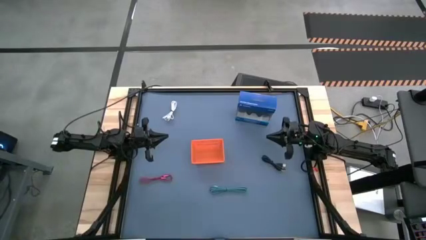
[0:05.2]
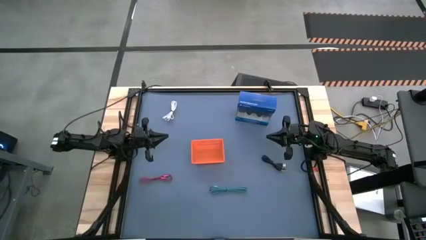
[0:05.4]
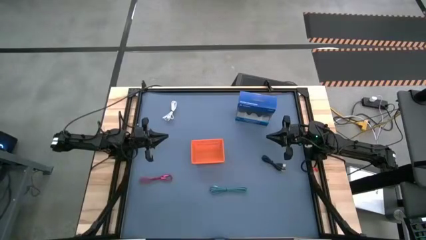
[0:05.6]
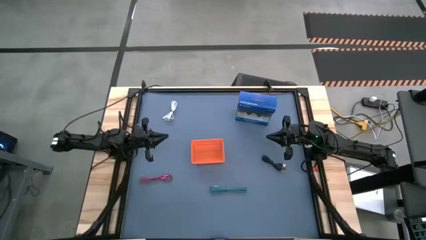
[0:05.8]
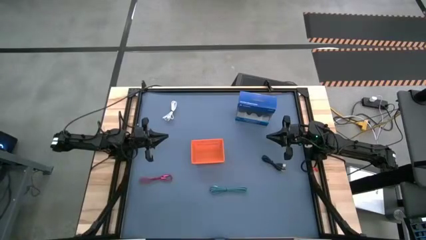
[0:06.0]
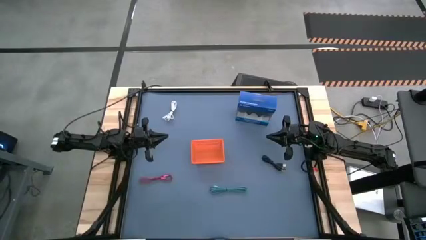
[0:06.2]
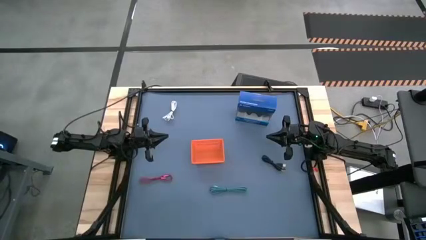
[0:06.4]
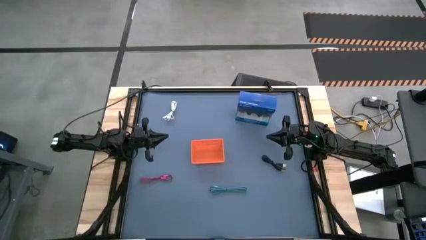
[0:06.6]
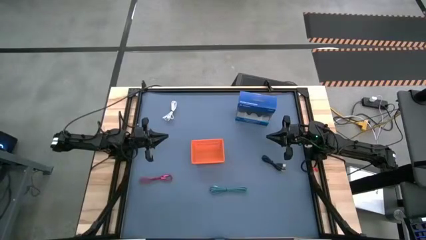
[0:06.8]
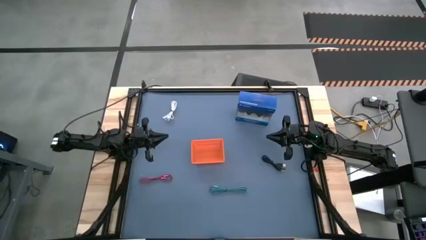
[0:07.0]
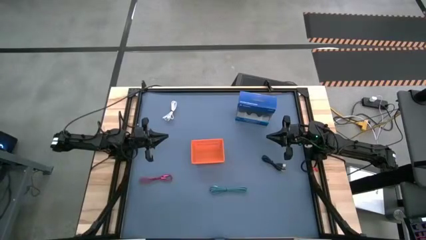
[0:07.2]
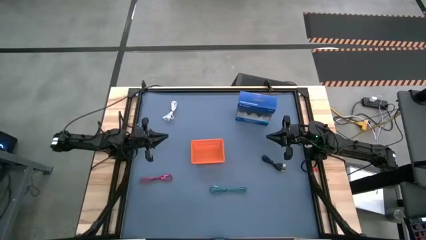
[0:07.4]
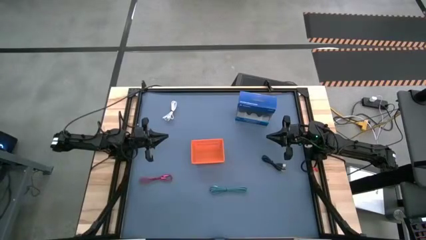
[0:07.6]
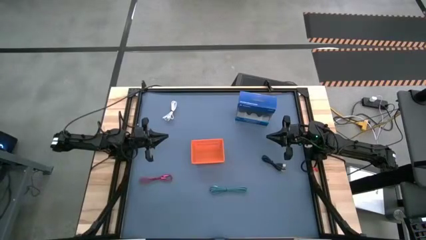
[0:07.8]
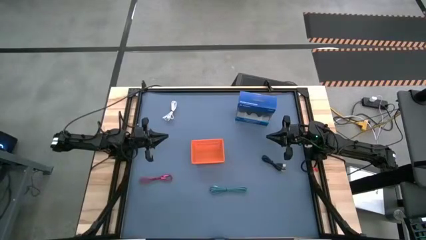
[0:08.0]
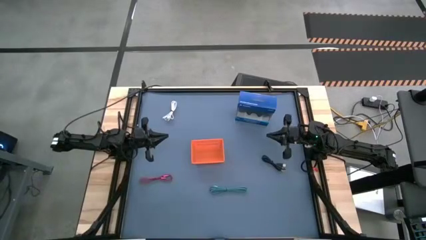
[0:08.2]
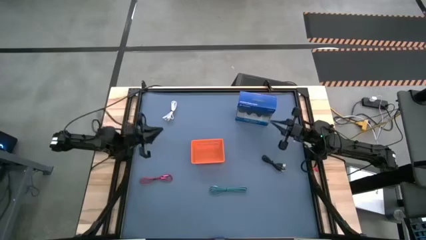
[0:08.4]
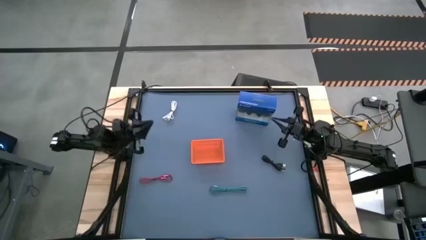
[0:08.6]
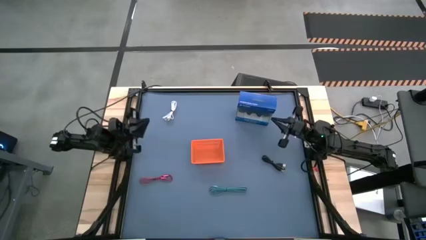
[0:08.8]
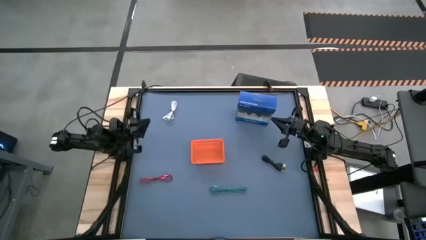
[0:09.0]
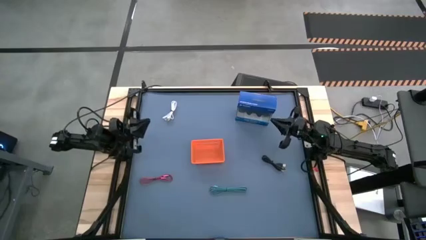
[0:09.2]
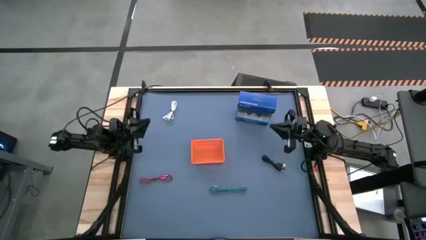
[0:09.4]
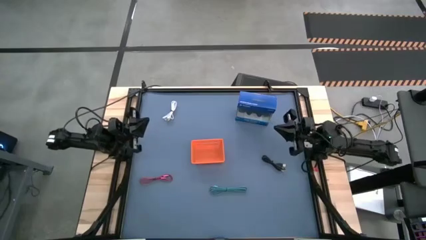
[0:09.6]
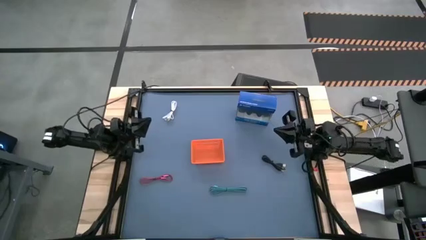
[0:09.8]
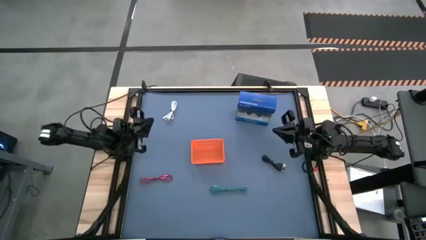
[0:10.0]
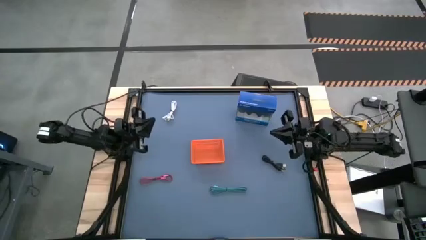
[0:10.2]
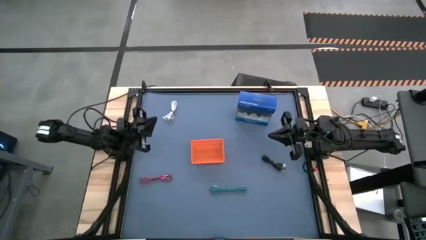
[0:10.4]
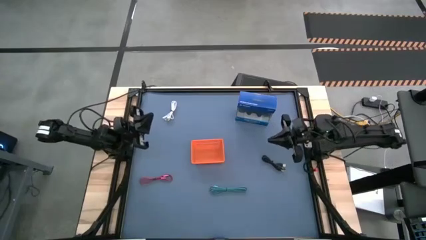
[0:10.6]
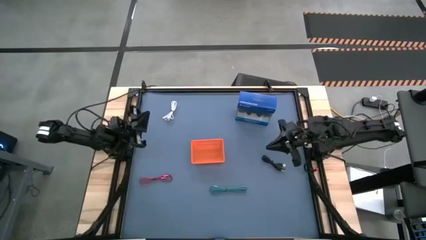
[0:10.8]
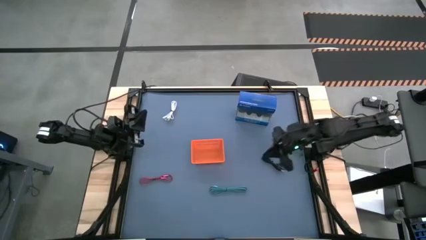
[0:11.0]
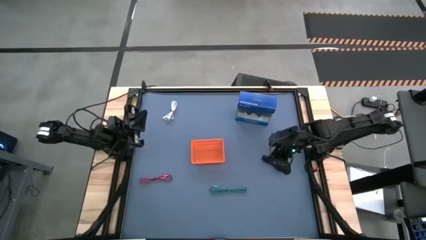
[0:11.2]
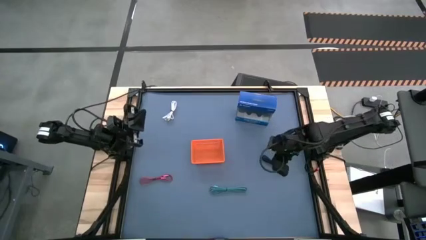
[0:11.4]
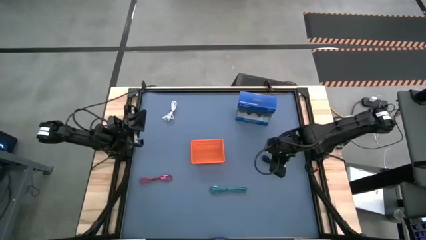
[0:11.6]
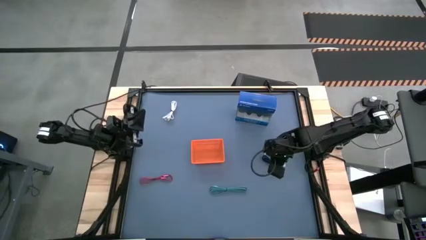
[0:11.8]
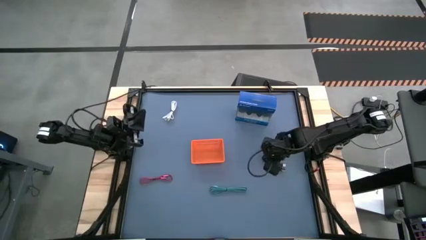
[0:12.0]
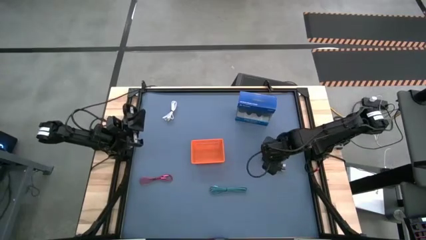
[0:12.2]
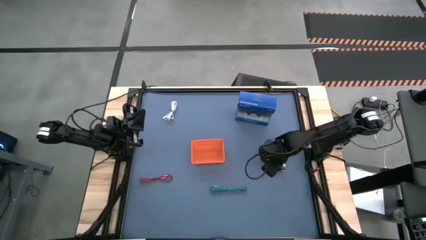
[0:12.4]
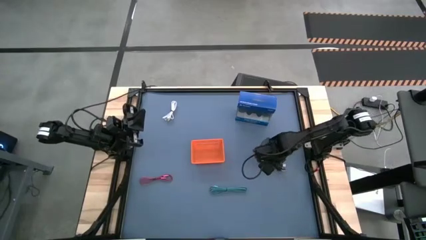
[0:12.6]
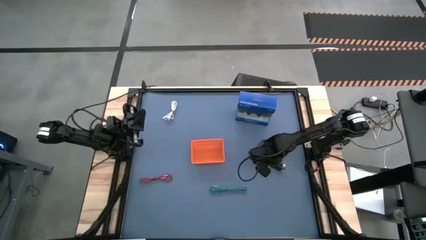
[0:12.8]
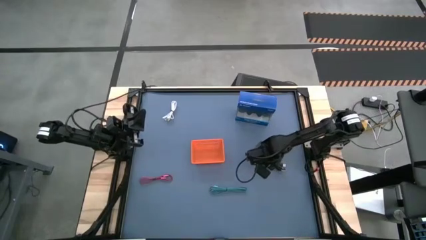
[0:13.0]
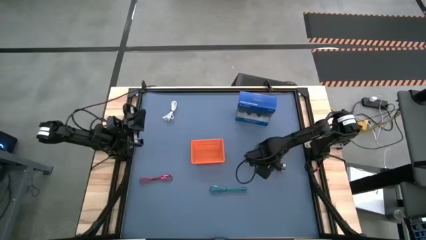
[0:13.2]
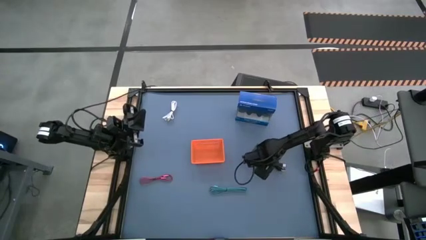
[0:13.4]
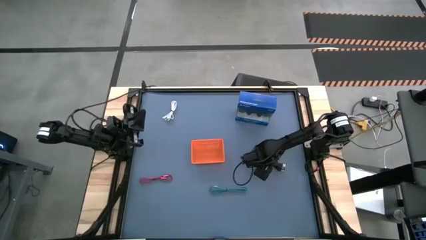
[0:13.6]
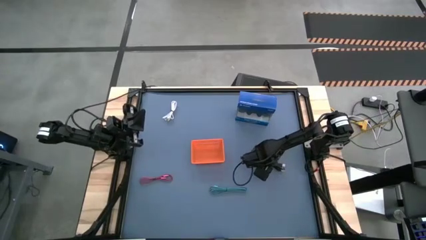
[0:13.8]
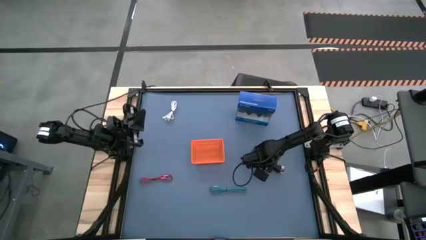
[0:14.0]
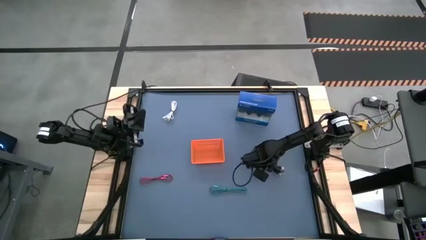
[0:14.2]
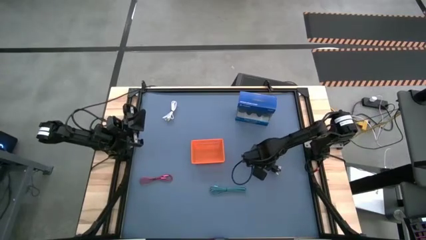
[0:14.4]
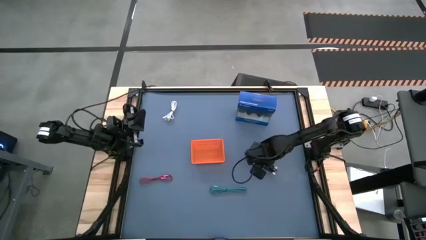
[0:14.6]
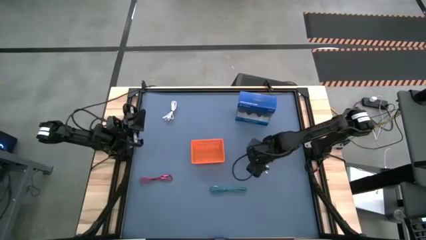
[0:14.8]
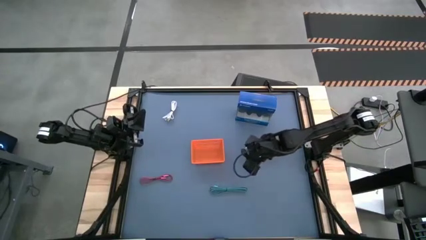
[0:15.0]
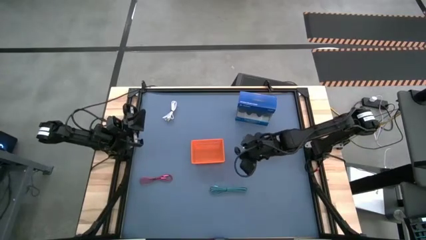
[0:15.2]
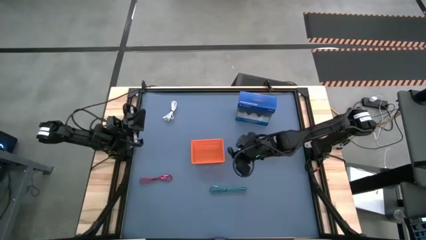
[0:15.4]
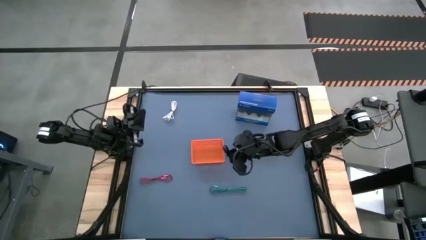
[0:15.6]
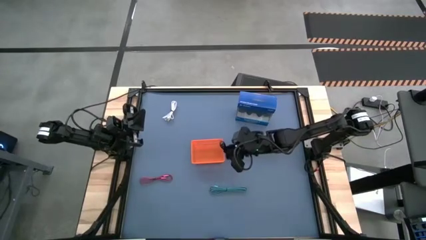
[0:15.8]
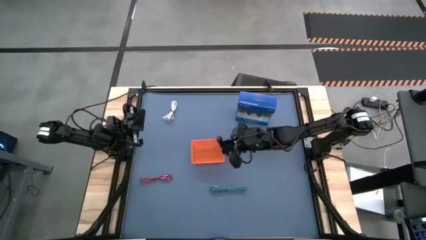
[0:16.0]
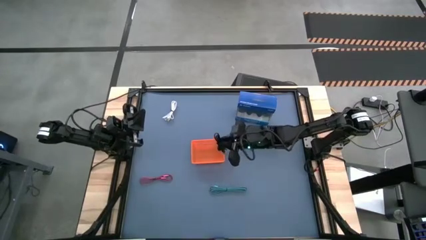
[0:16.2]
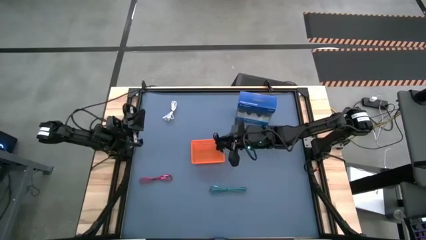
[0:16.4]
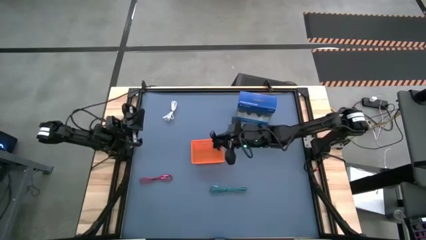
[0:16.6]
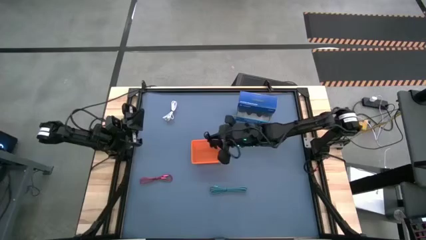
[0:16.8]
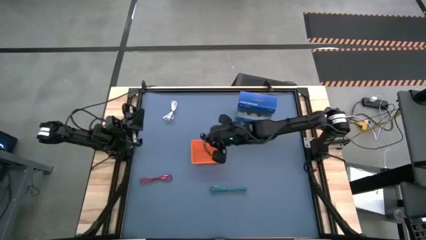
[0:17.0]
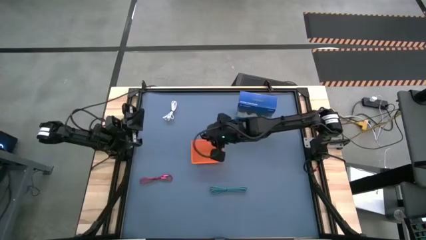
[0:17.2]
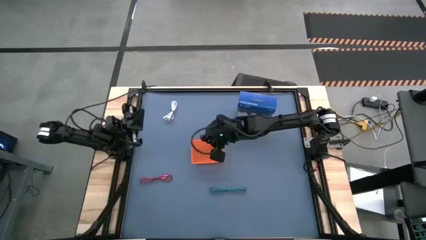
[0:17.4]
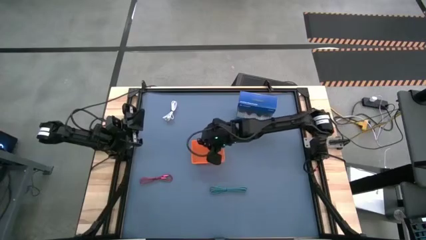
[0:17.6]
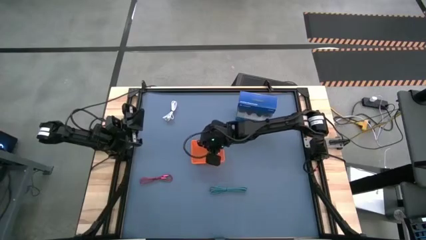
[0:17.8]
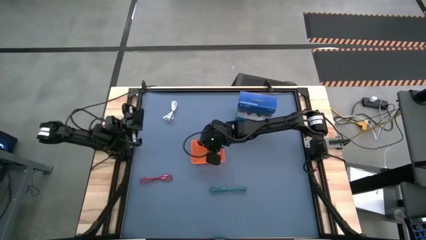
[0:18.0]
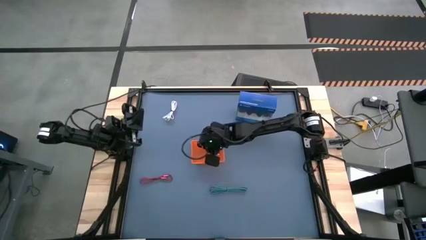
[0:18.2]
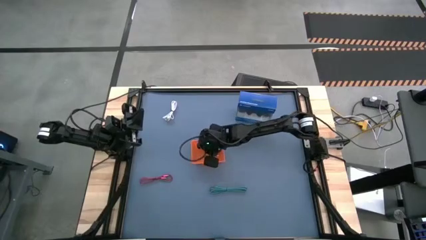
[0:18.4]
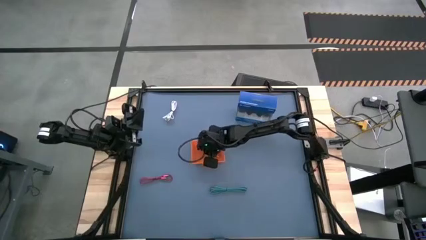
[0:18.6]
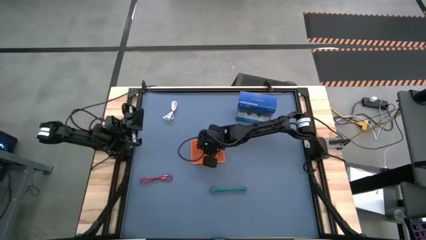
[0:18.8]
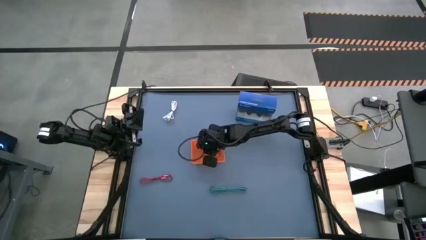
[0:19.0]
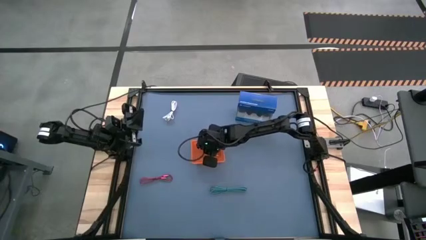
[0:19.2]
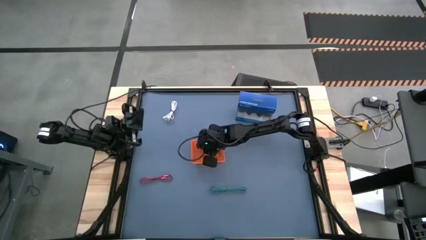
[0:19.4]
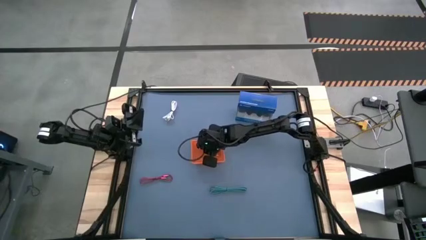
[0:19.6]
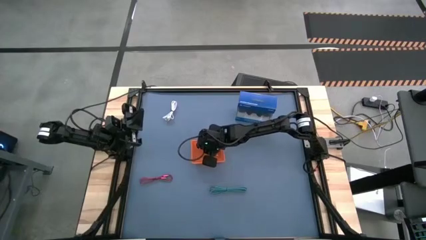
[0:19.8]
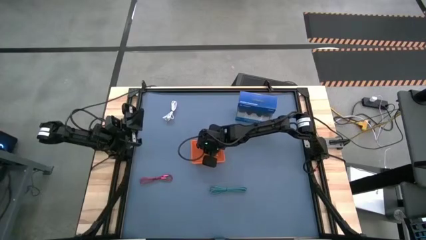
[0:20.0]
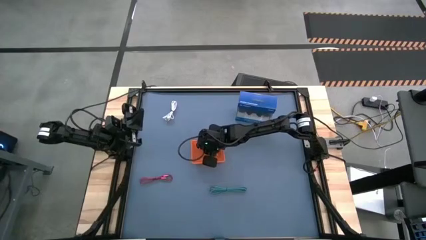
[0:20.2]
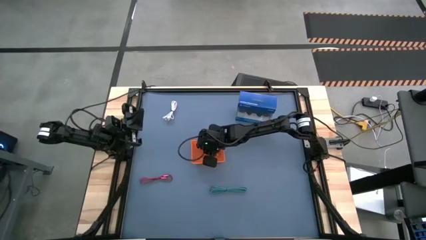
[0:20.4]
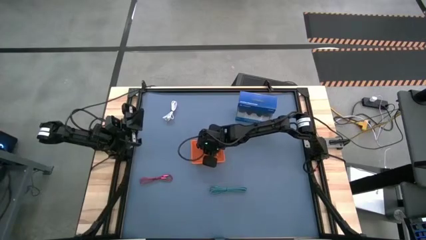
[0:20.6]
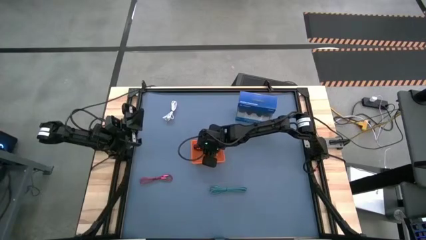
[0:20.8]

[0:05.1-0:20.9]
Task: Pick and place USB-C Cables
Put the black charger cable into the orange bin
